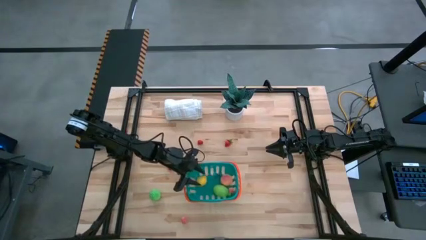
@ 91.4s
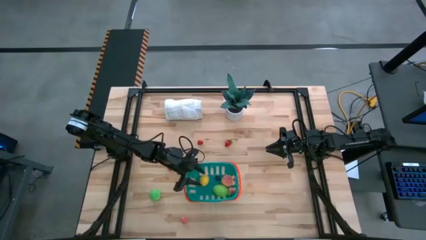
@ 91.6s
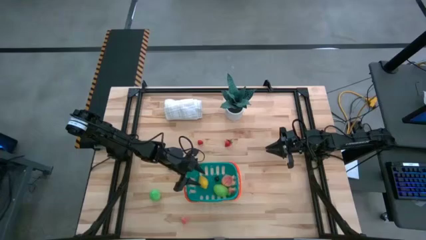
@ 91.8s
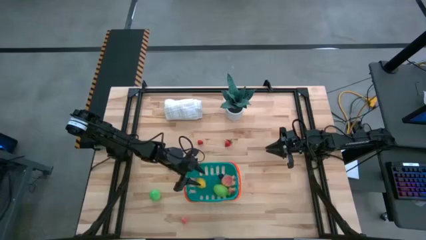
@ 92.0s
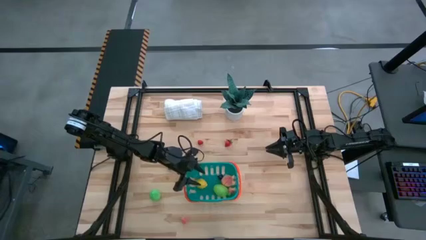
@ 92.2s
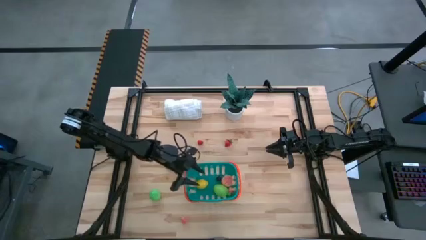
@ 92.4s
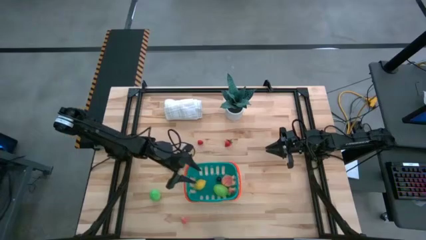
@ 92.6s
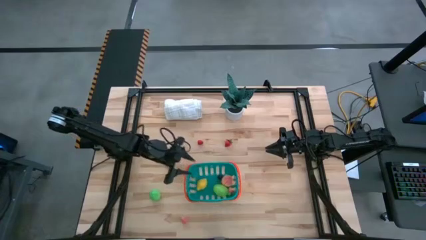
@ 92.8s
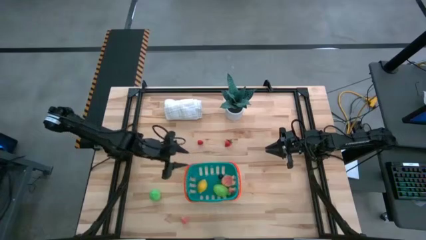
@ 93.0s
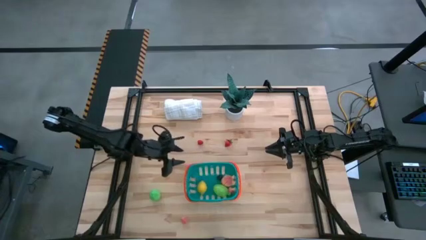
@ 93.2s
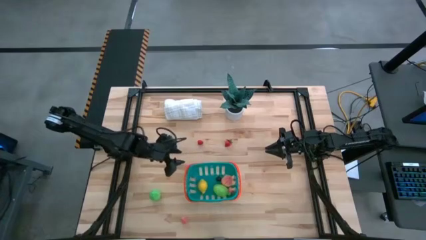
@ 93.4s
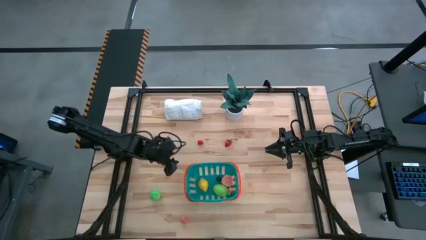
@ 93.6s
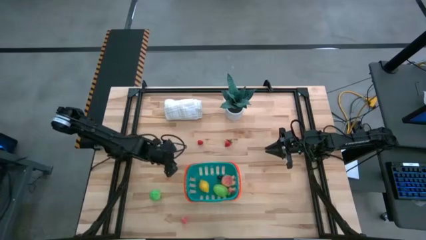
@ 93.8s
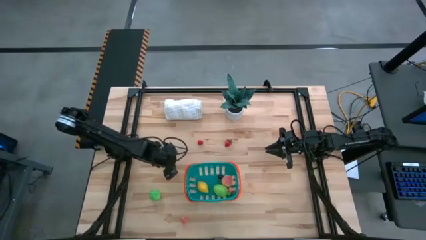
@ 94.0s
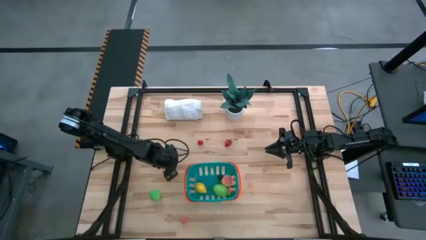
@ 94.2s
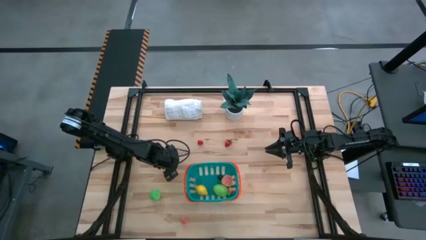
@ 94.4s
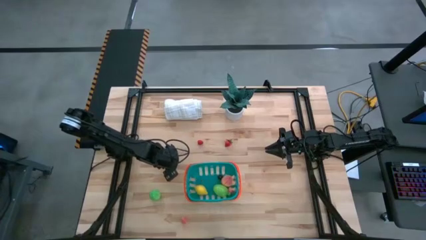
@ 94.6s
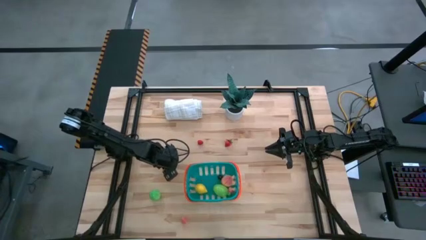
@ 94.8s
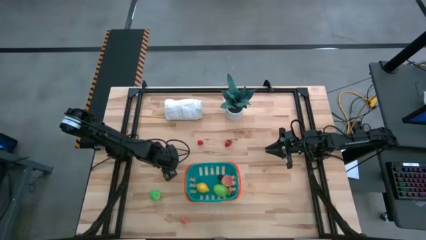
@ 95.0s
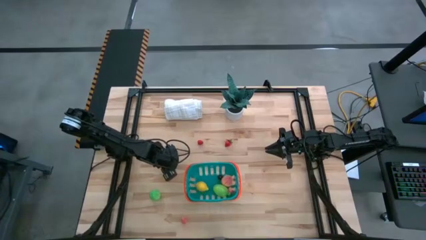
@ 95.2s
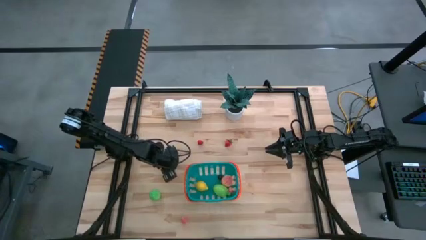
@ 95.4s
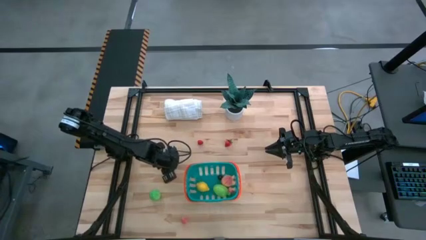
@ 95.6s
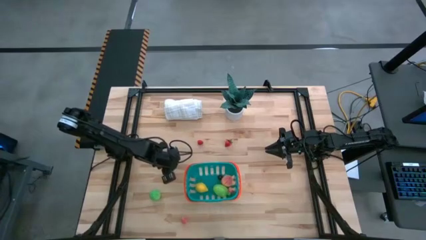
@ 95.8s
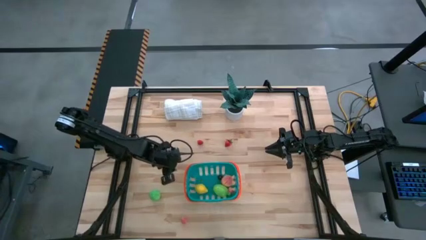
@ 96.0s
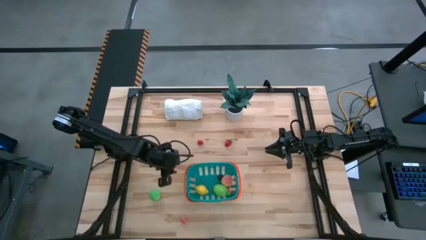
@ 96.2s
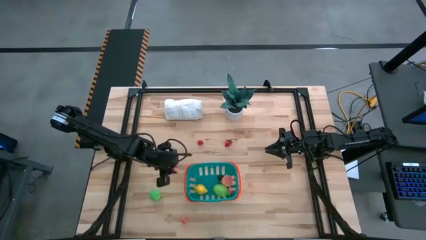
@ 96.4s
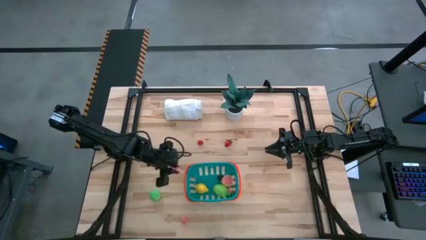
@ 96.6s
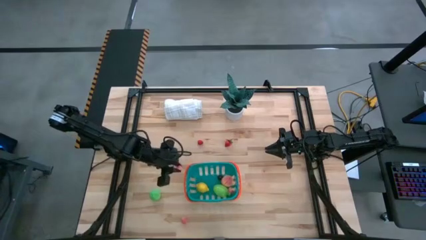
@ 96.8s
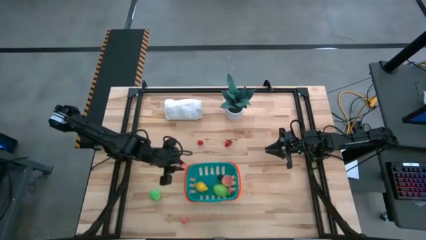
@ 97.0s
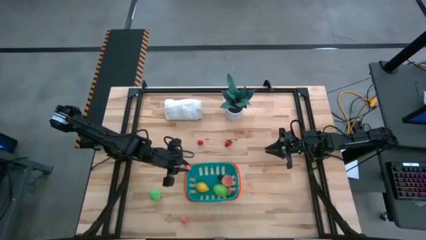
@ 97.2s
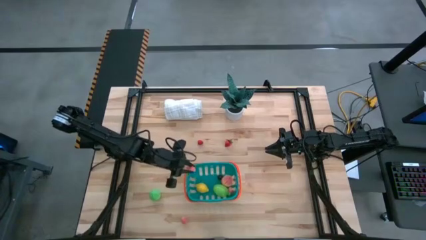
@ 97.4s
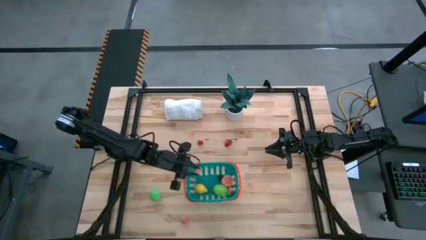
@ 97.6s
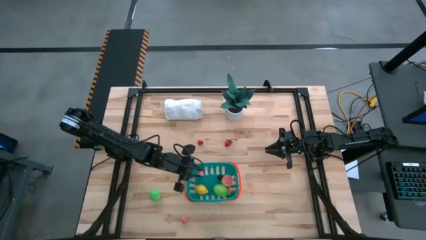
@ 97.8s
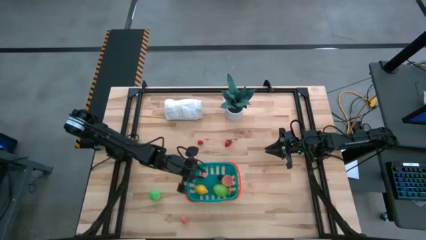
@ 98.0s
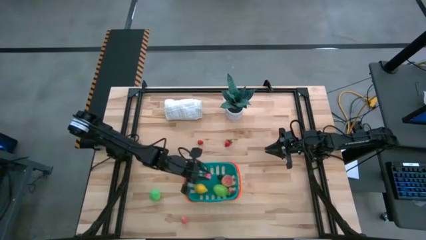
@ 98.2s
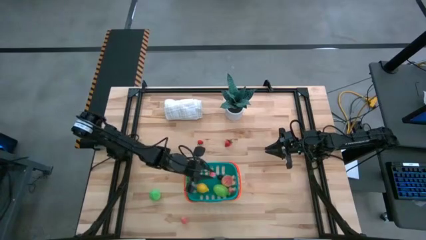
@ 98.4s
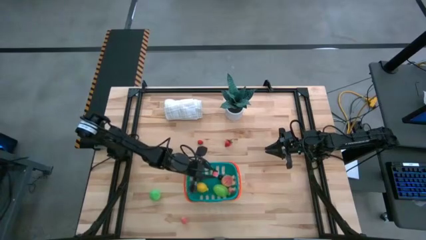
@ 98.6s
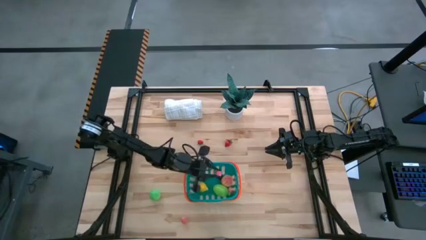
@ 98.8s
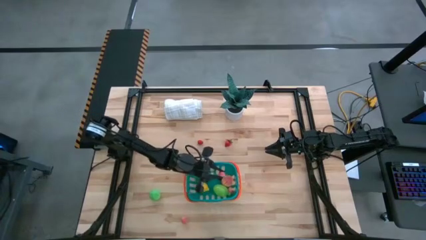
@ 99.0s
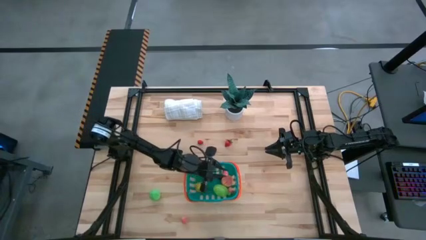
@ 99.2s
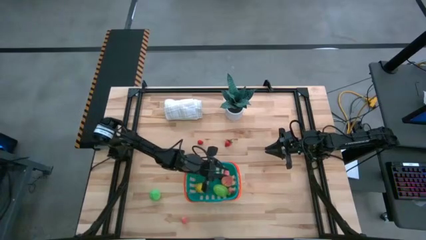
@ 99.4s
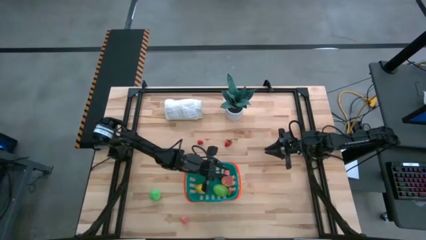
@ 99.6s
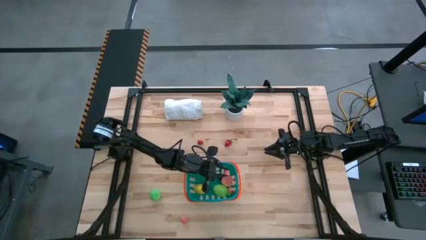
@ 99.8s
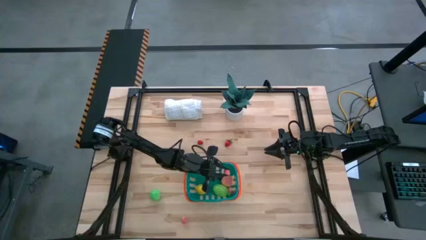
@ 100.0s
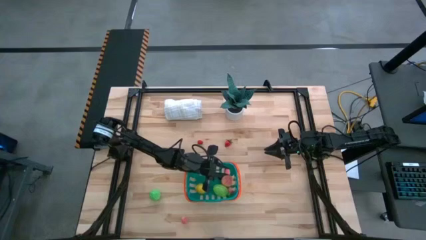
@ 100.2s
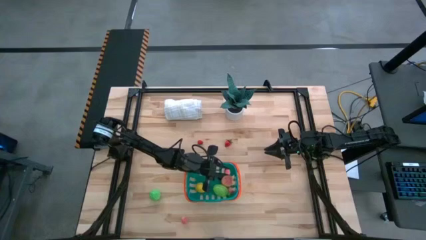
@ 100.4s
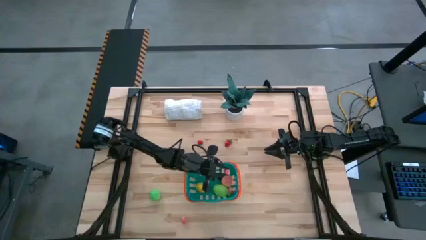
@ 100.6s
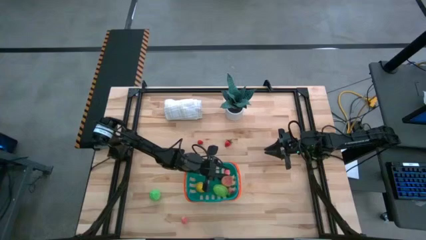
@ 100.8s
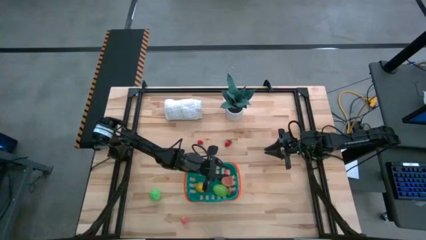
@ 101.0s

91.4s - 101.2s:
Task: Pick and placing Produce into tupperware
Put the top small pink peach into the blue bin

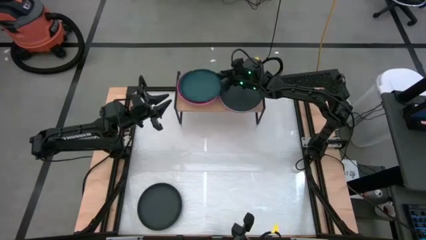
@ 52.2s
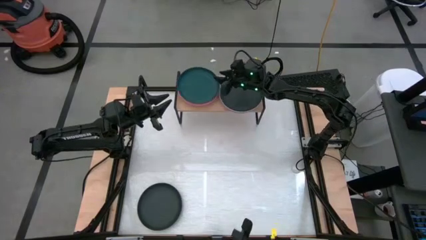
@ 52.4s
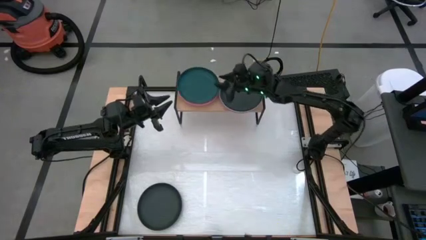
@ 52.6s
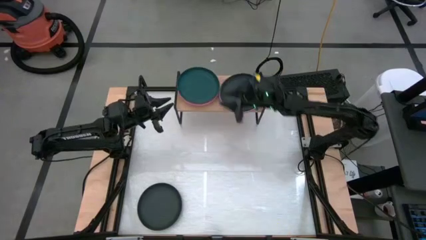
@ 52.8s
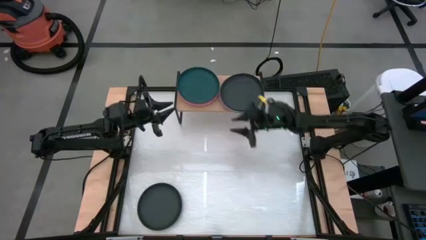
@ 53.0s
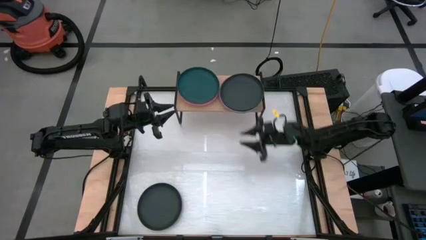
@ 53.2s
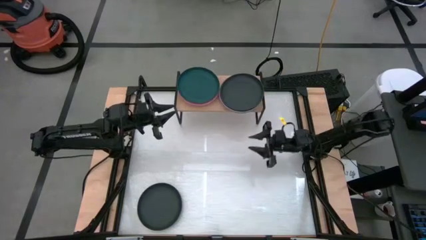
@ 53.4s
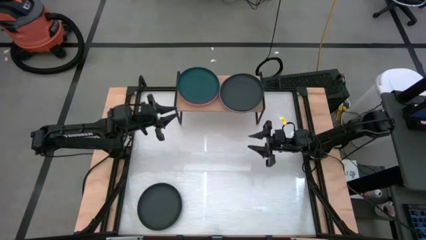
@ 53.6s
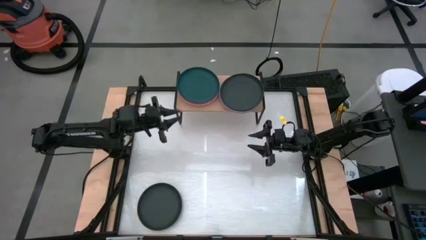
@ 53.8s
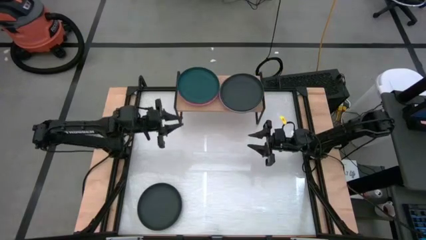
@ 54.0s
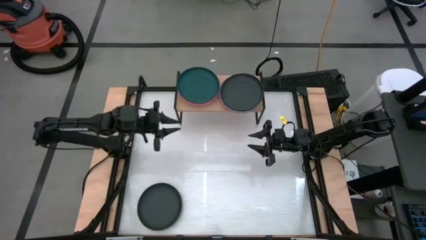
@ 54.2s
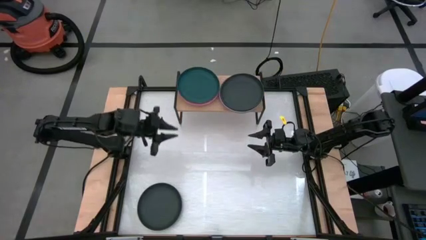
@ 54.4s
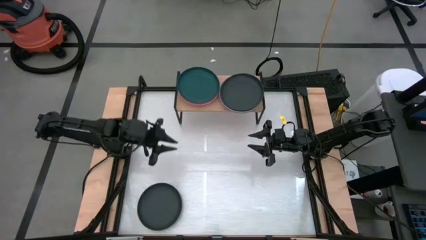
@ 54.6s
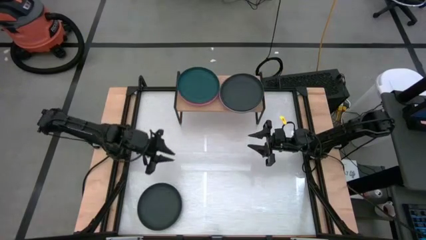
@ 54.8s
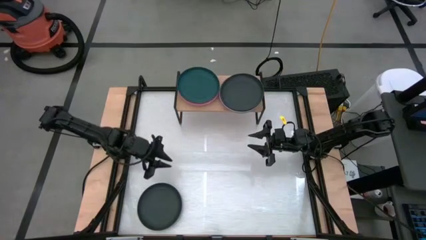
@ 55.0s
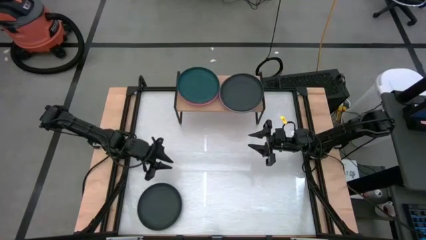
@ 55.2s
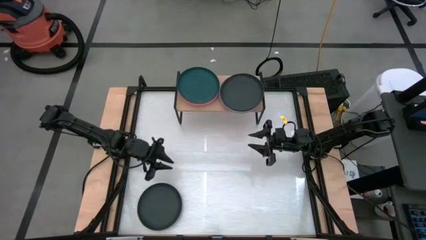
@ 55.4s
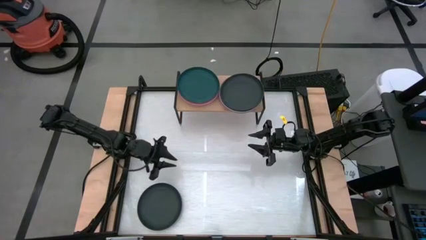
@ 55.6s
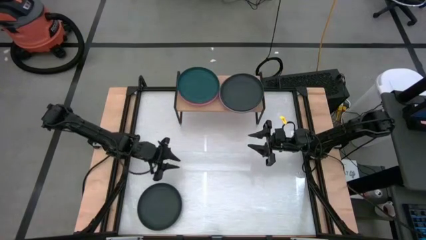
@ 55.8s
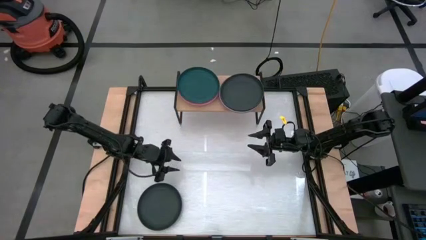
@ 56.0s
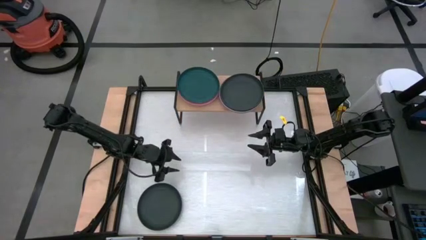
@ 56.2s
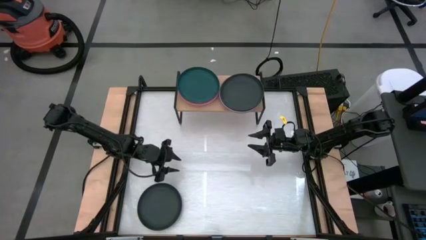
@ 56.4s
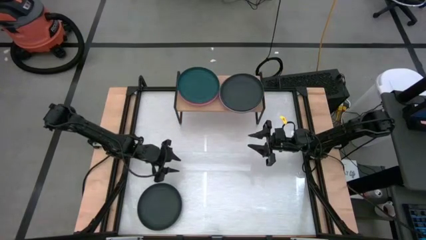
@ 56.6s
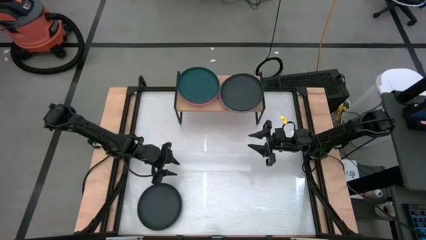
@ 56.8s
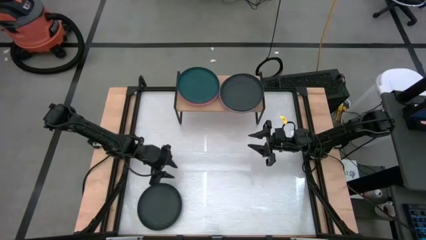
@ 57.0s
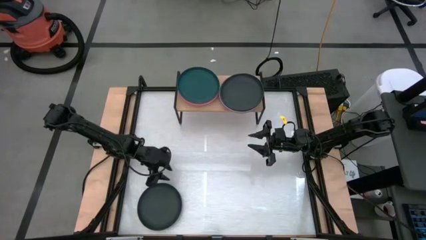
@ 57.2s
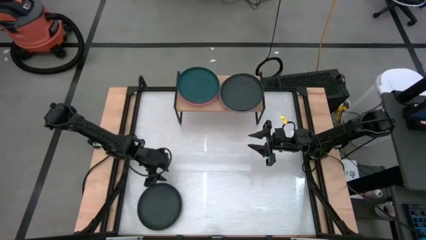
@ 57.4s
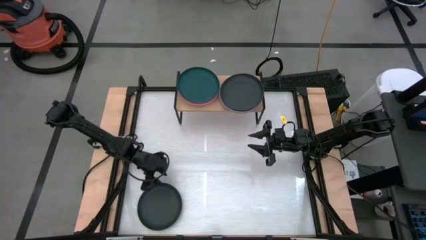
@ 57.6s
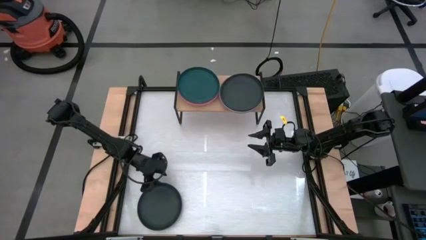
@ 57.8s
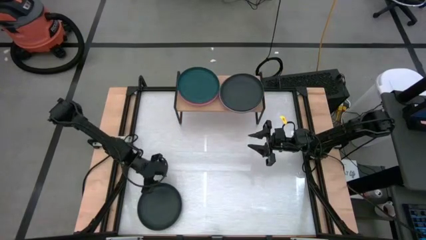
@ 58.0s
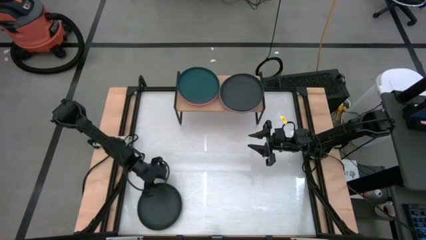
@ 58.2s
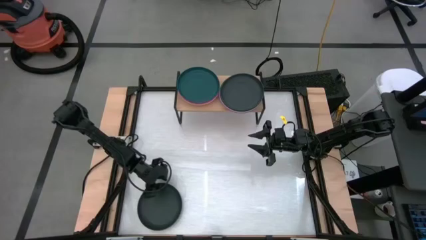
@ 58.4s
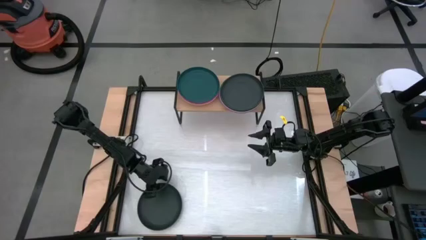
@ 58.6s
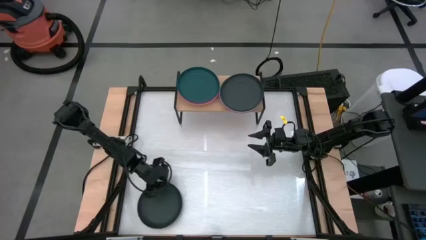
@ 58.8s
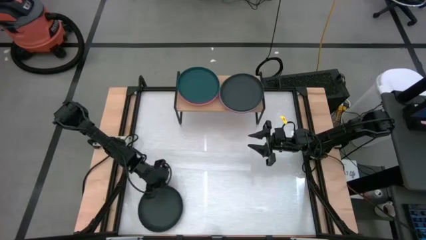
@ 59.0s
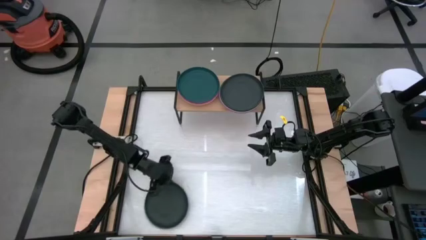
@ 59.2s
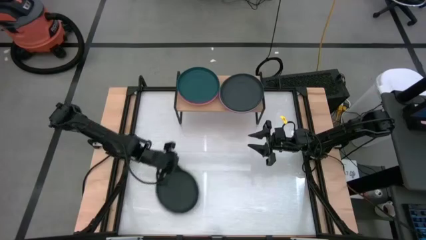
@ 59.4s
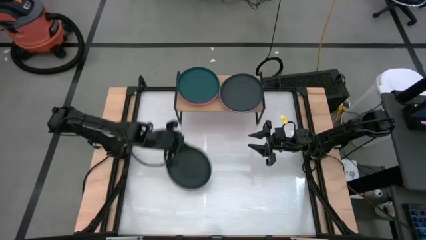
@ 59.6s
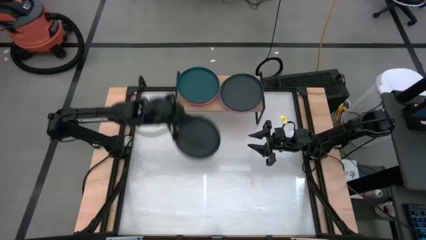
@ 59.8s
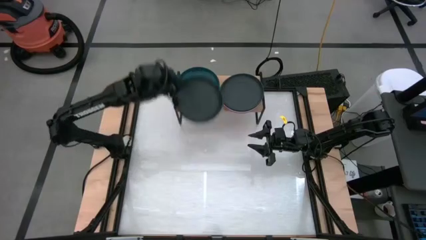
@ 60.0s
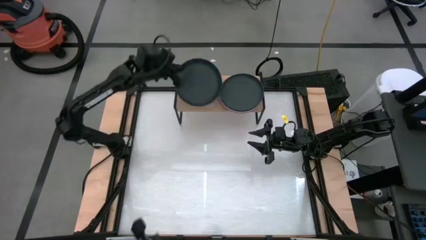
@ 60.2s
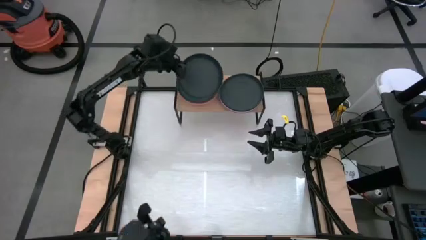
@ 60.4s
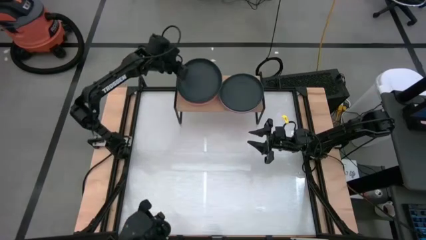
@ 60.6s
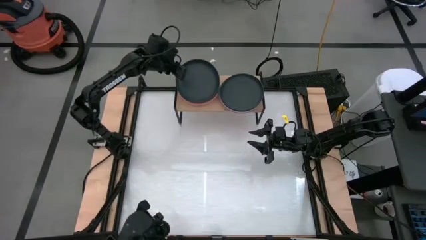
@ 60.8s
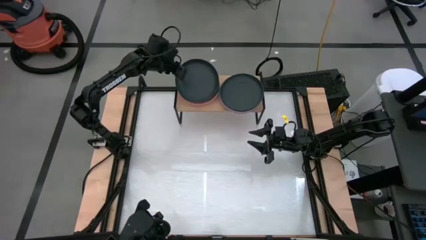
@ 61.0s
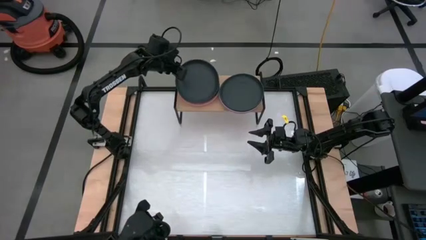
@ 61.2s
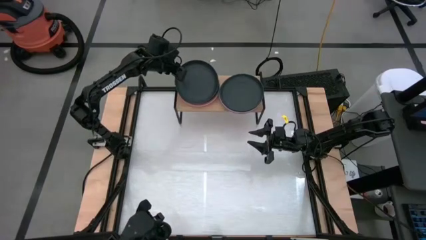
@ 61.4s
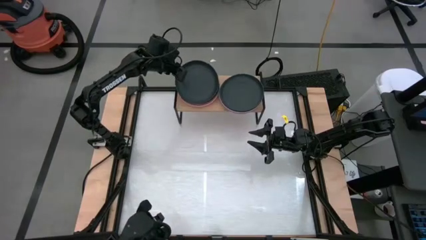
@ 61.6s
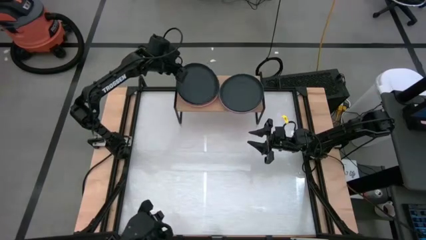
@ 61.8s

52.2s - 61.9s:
Task: Place and stack plates onto a shelf
Stack the black plate on top of the dark green plate on top of the shelf
